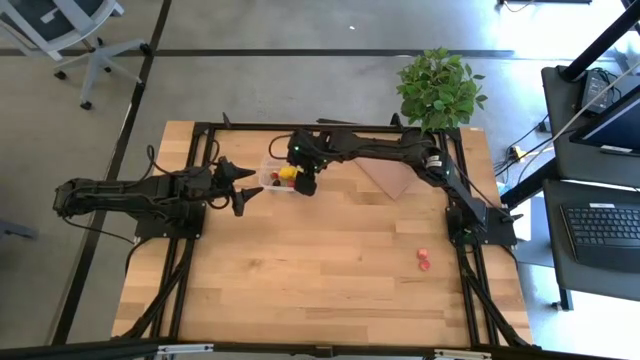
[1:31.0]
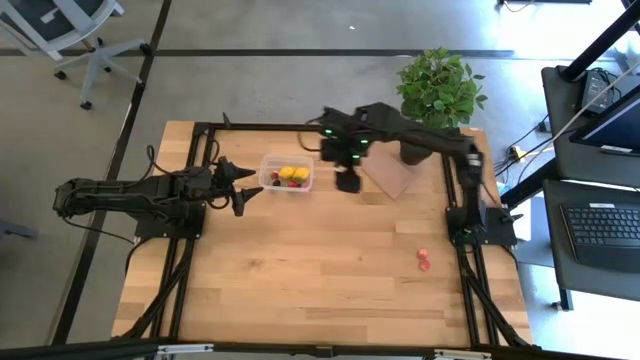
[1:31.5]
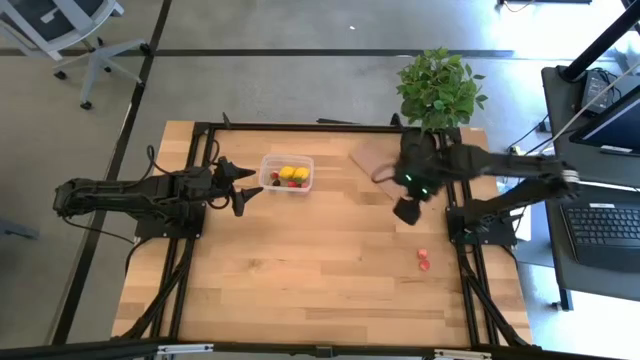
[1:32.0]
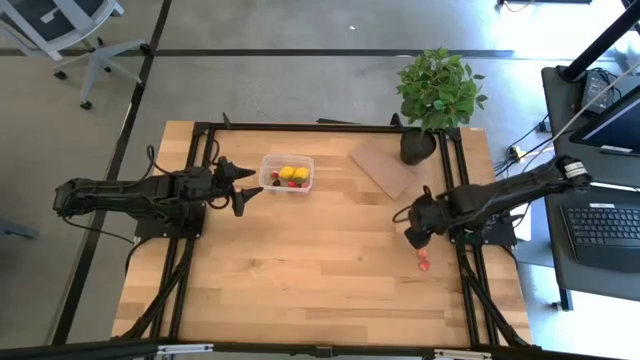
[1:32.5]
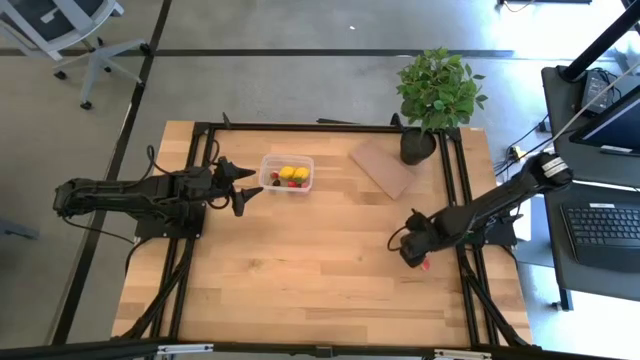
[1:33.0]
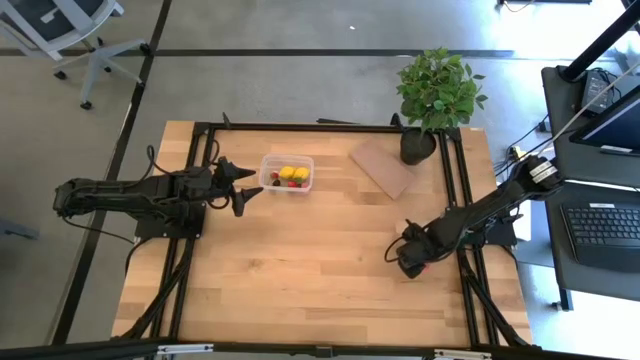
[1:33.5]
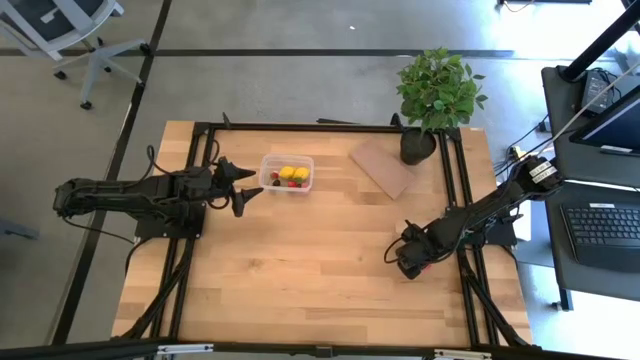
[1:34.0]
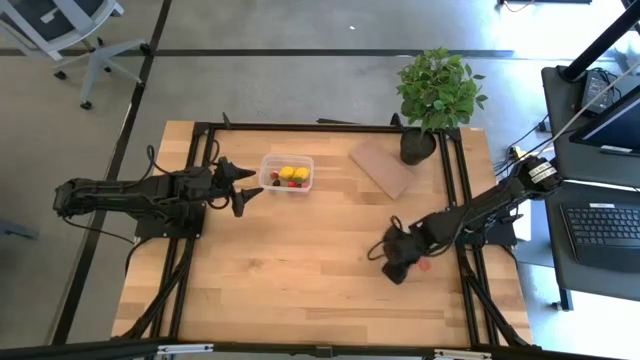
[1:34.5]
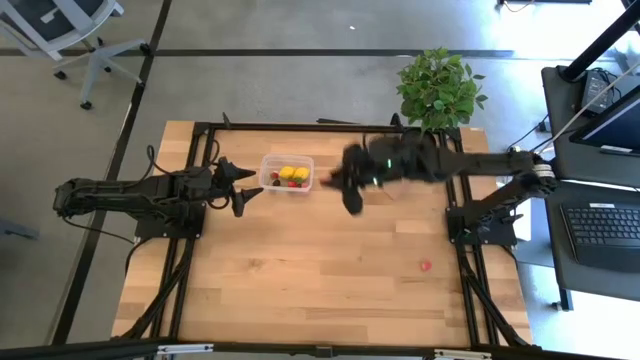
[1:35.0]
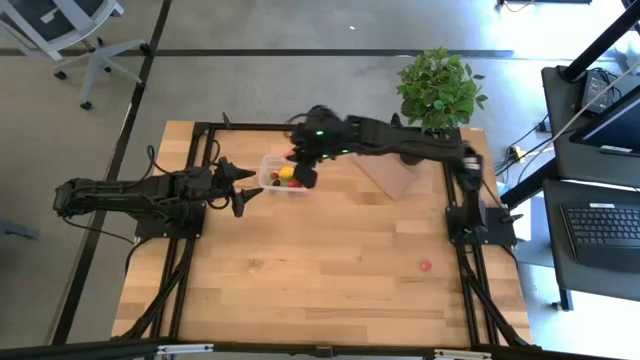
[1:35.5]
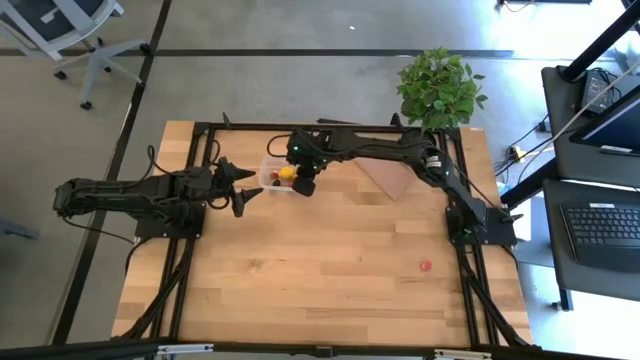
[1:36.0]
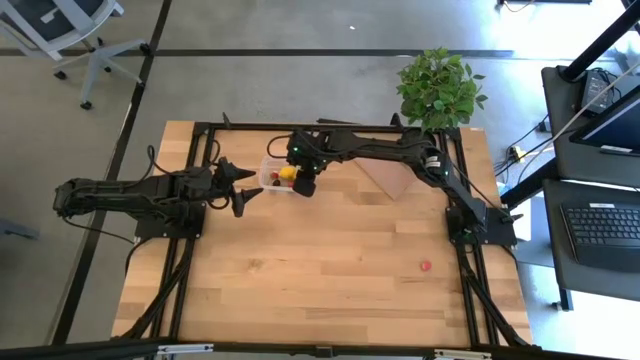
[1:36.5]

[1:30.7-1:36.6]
Task: Pick and placing Produce into tupperware
Put the pink peach into the transparent bin

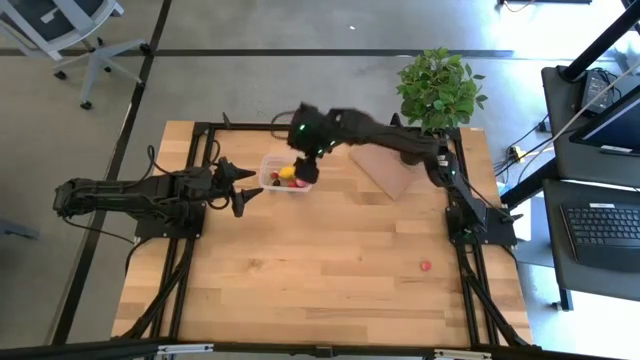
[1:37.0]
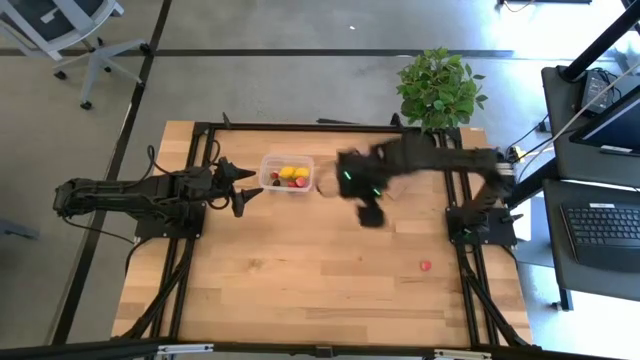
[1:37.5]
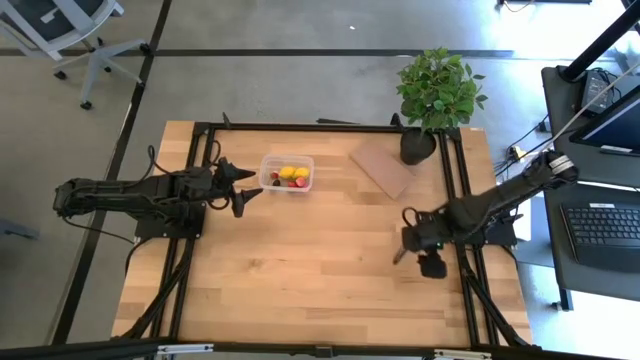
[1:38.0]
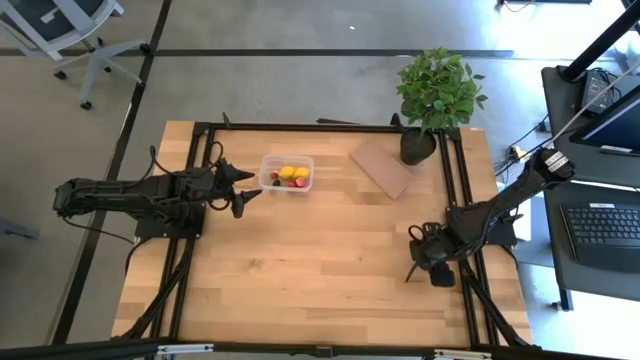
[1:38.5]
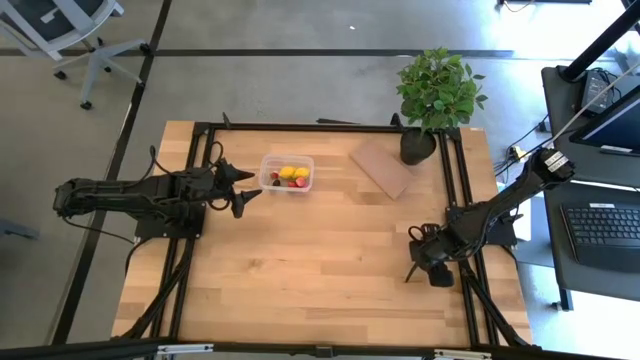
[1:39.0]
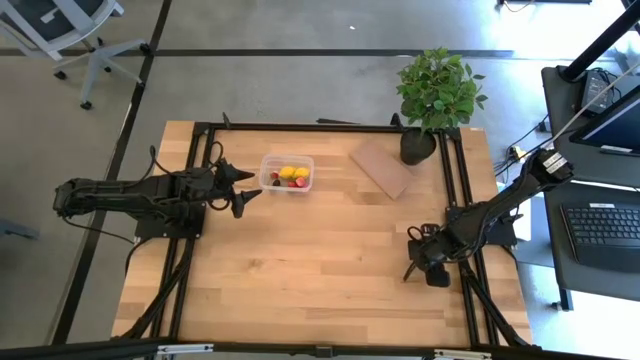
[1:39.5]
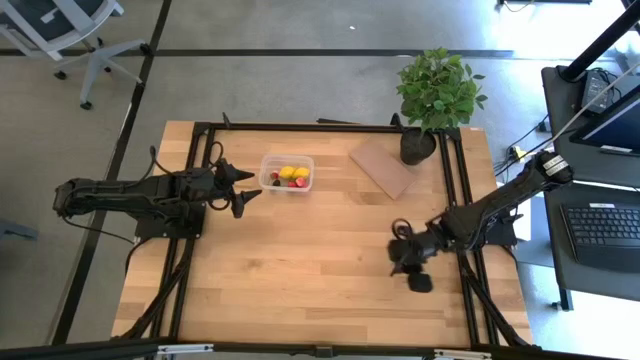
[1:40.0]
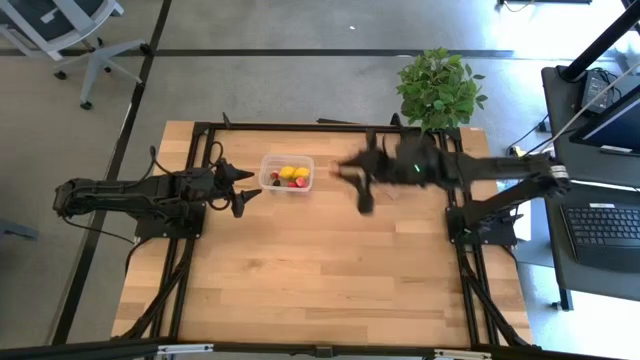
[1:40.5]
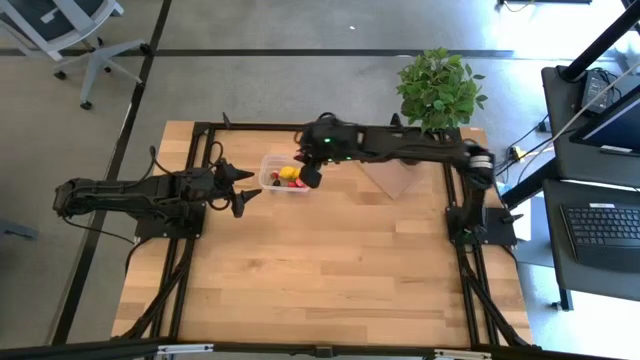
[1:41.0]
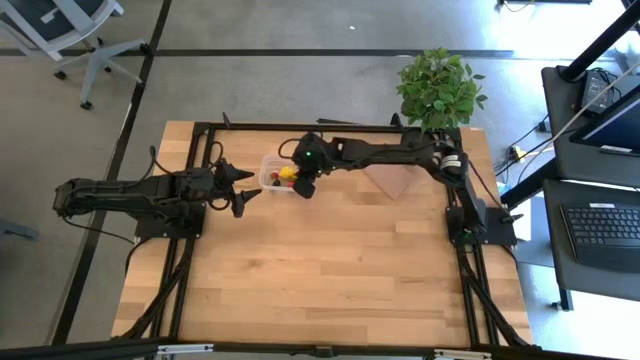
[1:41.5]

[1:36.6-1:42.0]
Put the pink peach into the transparent bin

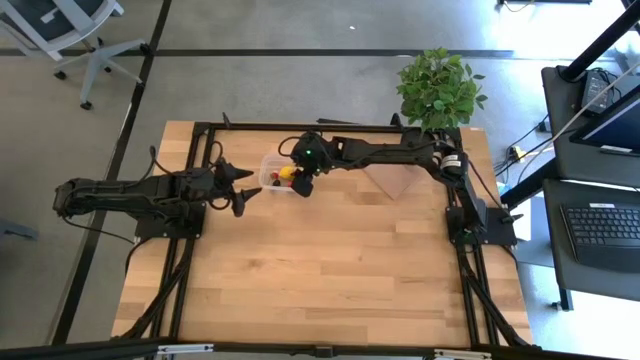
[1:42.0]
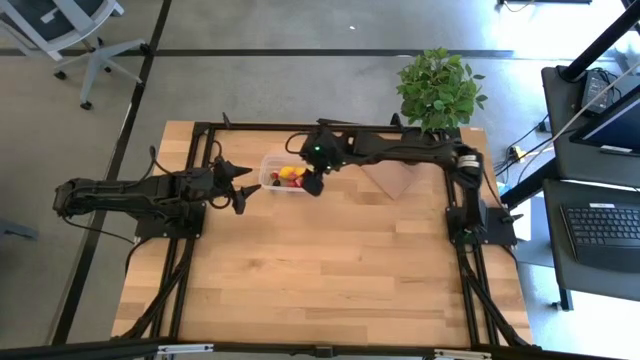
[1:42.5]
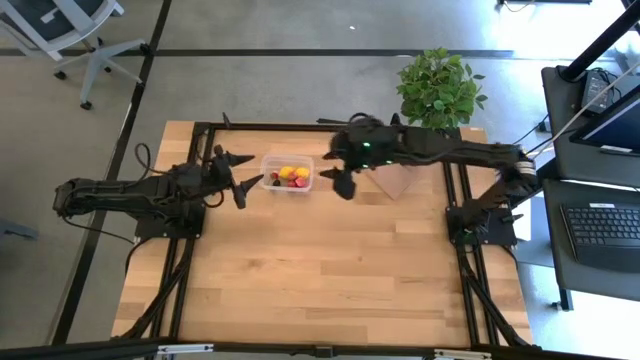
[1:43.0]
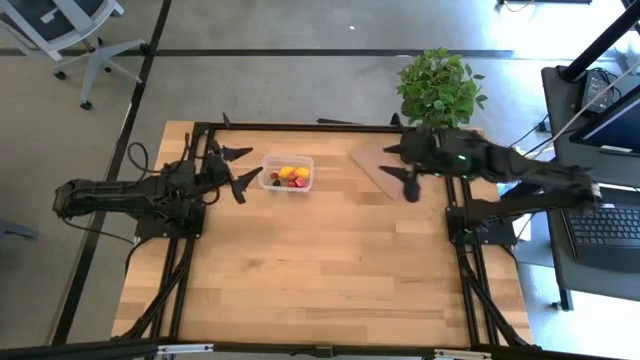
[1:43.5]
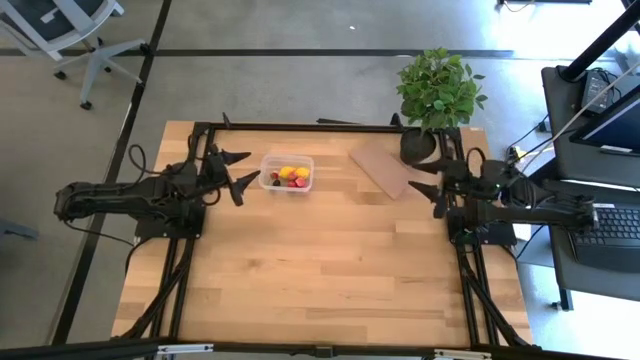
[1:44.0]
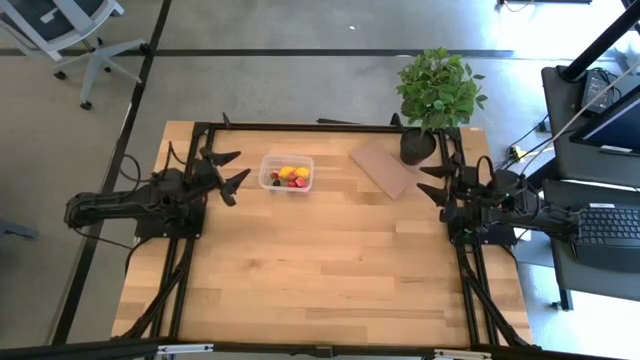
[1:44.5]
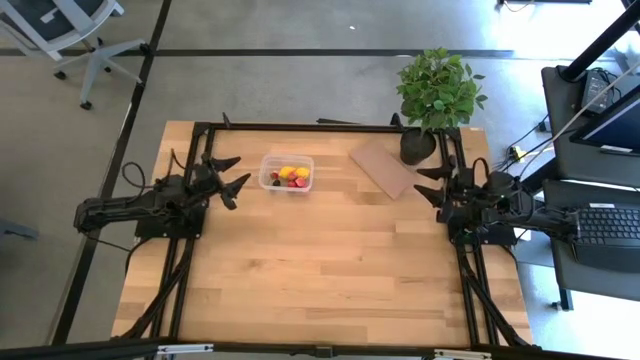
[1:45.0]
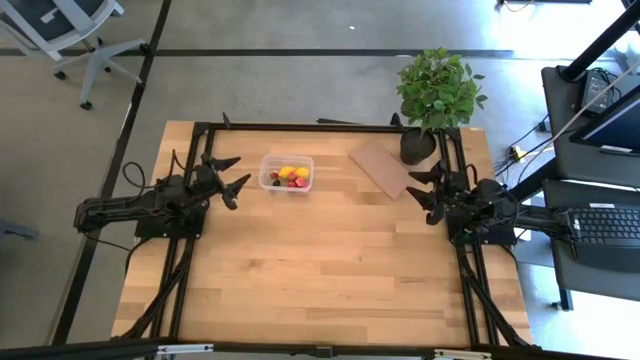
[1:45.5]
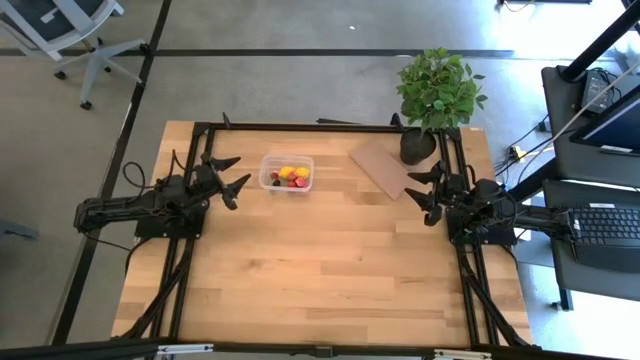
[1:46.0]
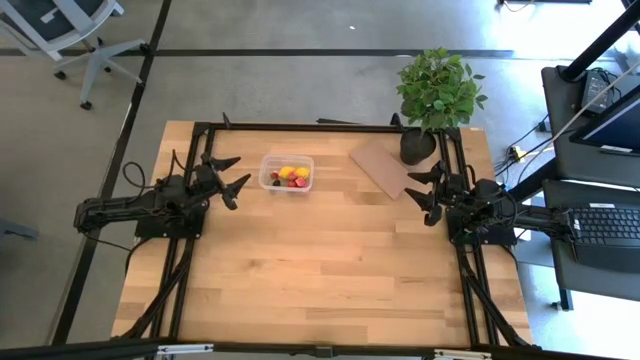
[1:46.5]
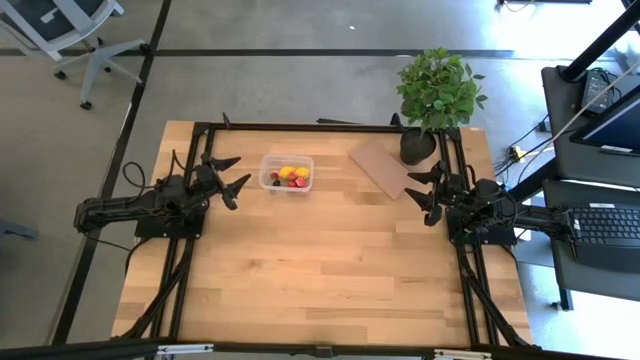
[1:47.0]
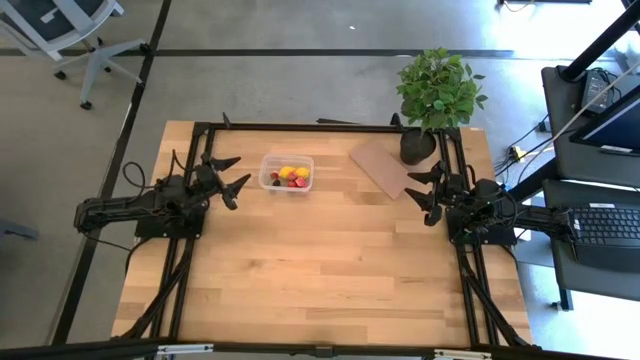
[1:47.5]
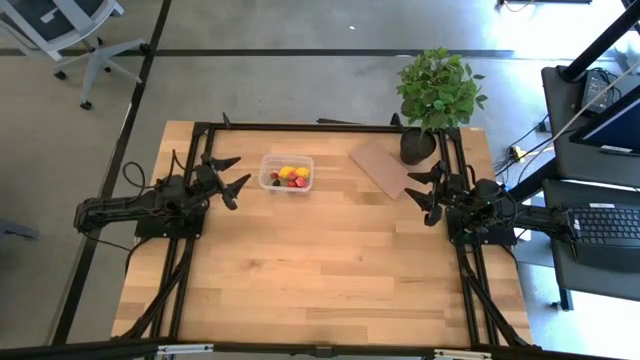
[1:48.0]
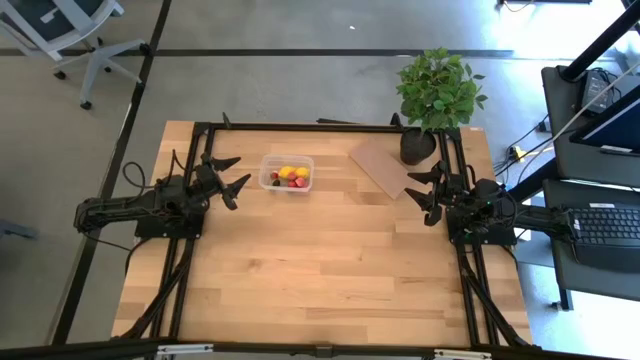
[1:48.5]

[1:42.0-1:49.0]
Return to Home Position

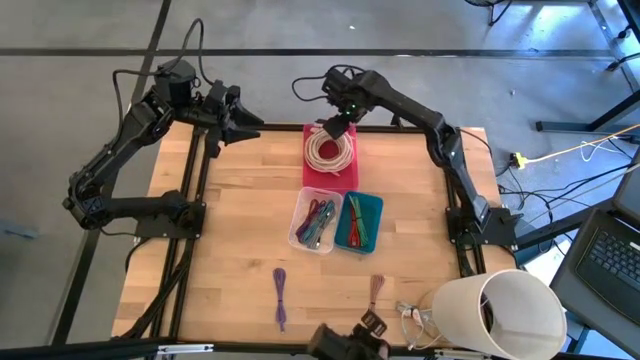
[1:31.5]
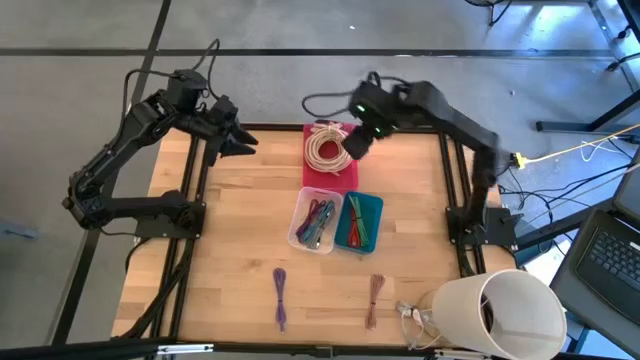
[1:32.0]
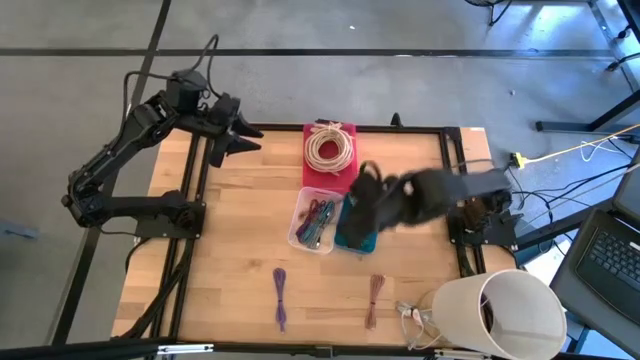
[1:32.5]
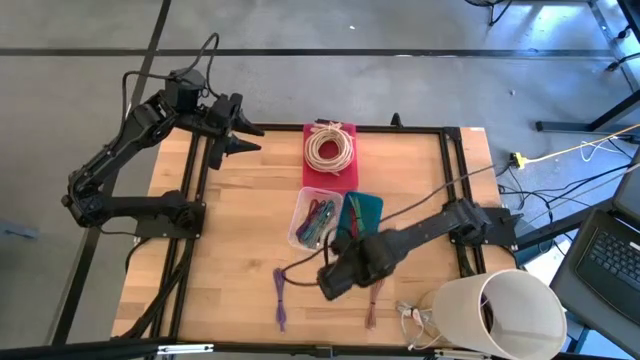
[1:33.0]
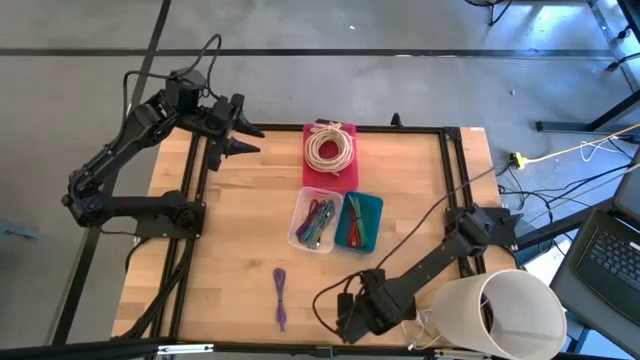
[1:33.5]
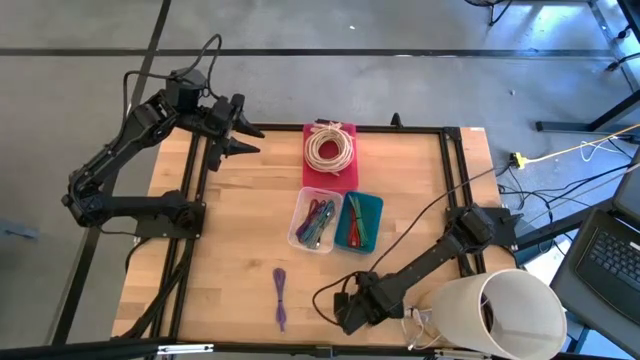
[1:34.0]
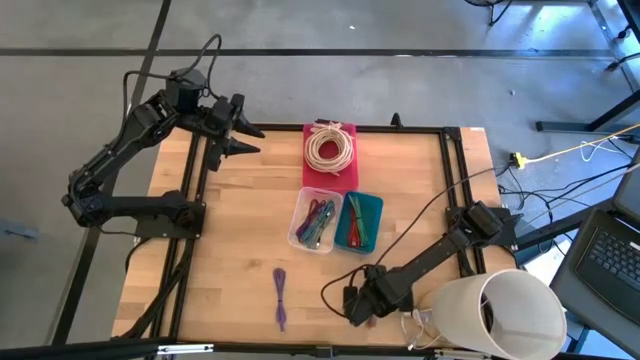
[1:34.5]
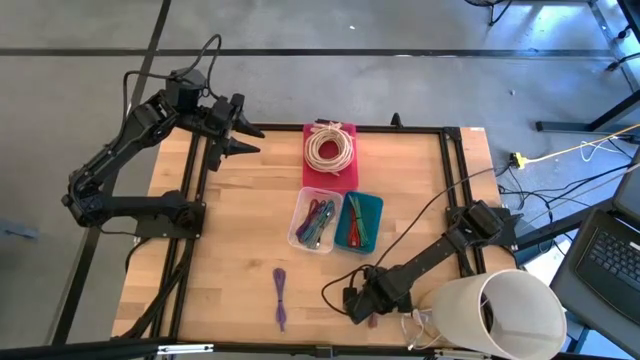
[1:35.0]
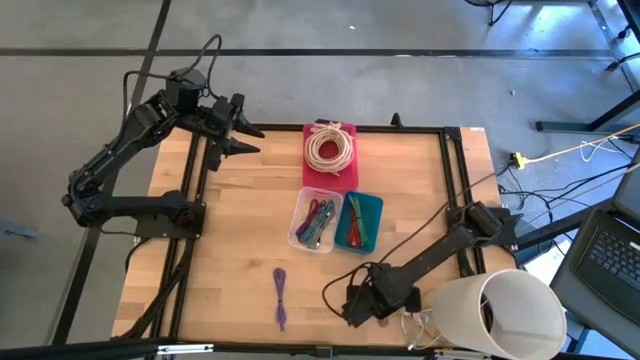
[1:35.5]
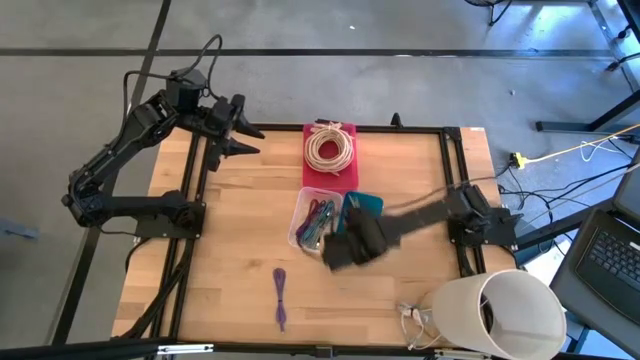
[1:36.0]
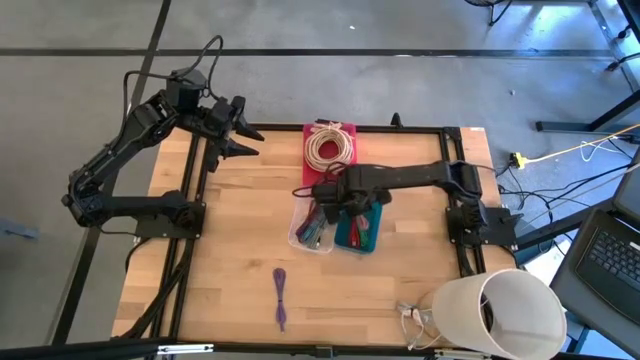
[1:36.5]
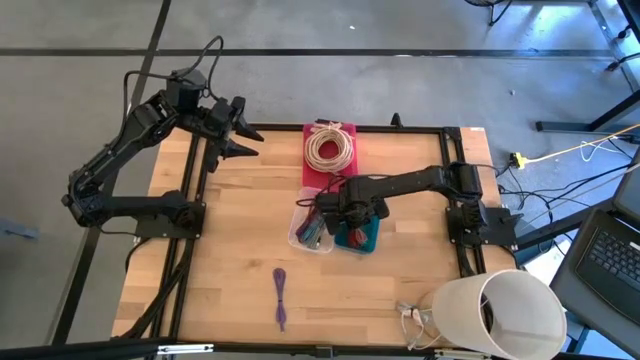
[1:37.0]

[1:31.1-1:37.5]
Task: Pick & Place USB Port
Put the pink charger cable into the blue bin
